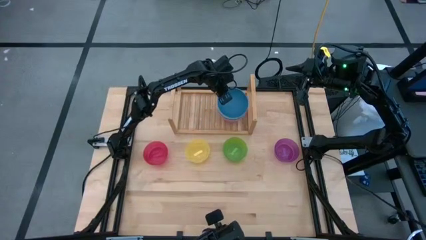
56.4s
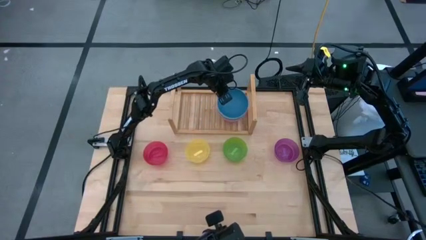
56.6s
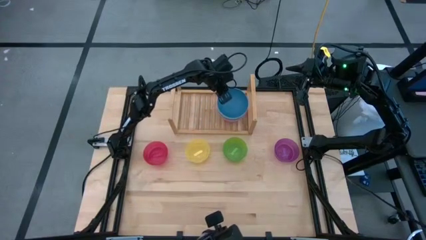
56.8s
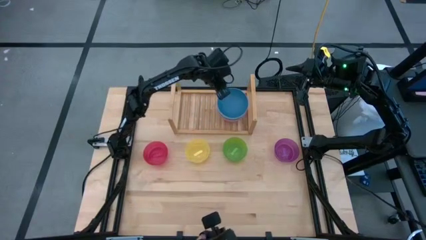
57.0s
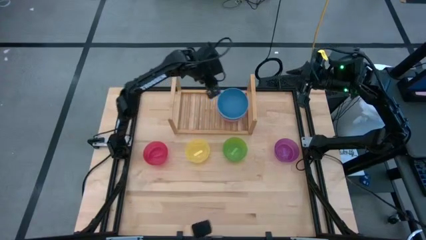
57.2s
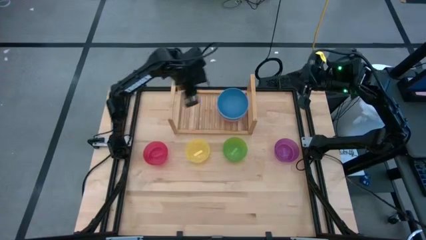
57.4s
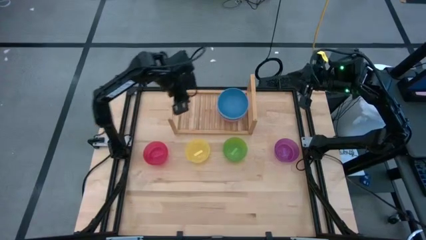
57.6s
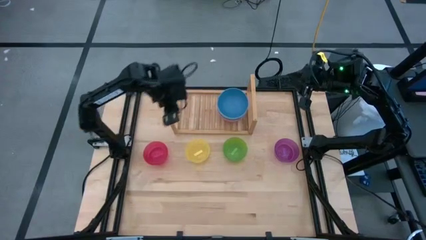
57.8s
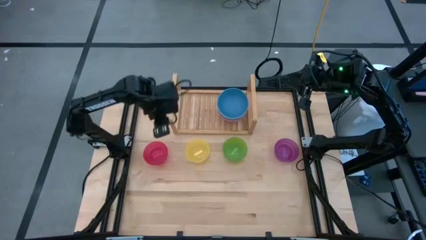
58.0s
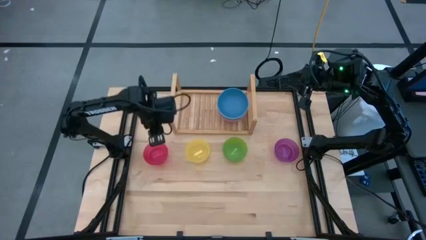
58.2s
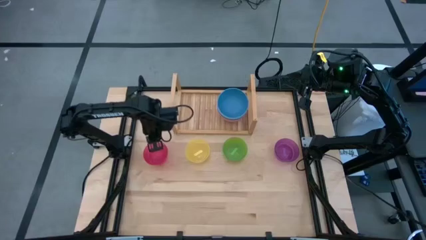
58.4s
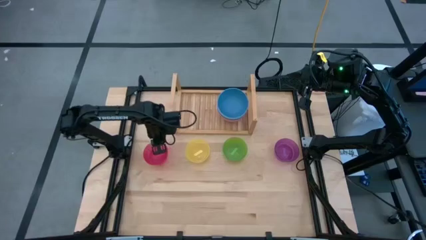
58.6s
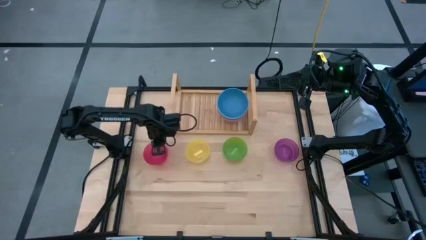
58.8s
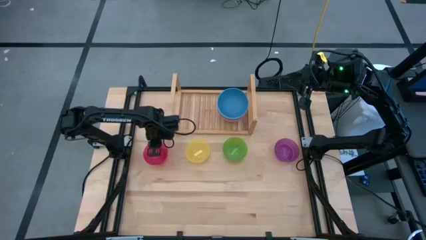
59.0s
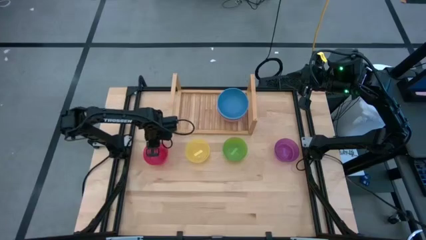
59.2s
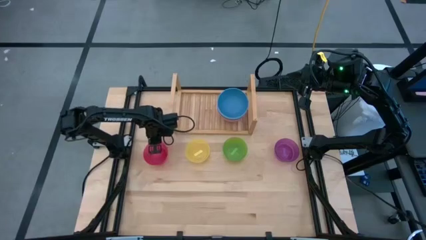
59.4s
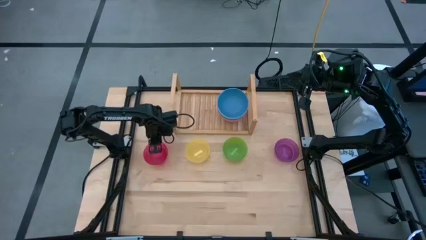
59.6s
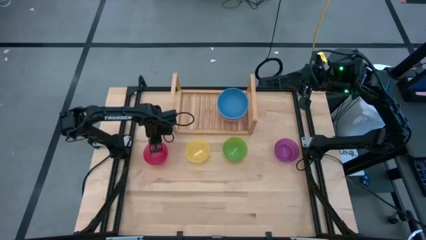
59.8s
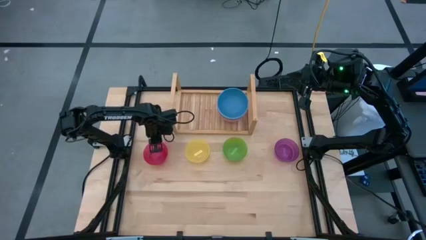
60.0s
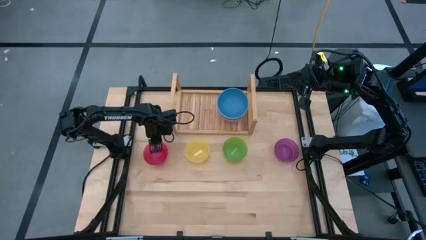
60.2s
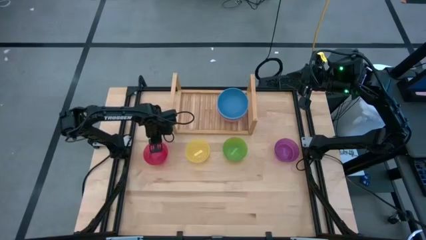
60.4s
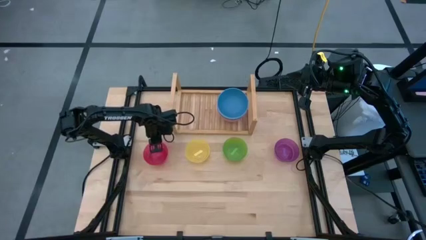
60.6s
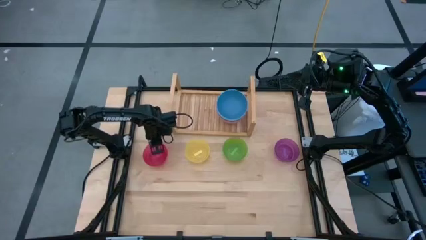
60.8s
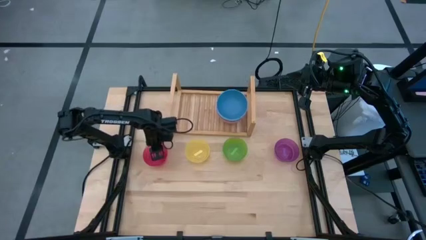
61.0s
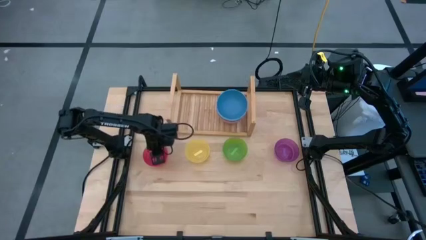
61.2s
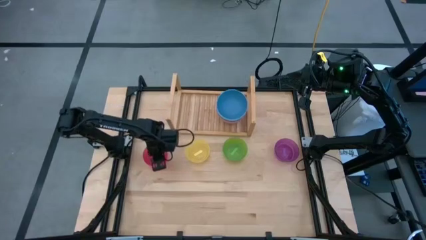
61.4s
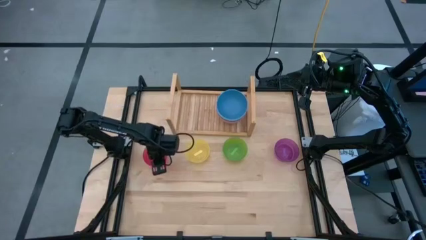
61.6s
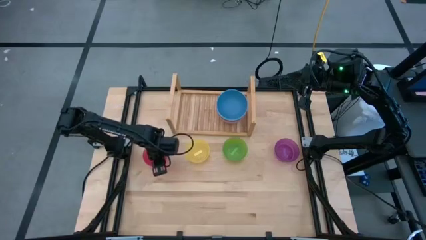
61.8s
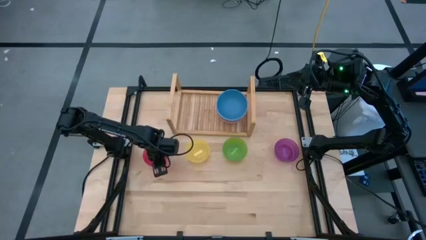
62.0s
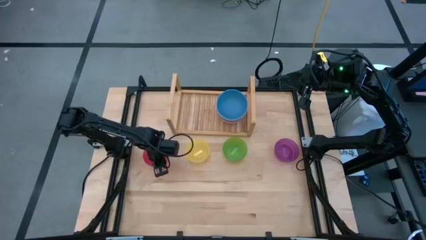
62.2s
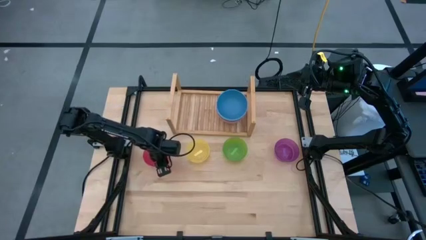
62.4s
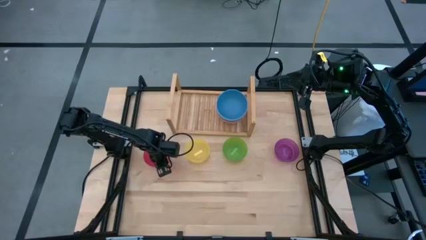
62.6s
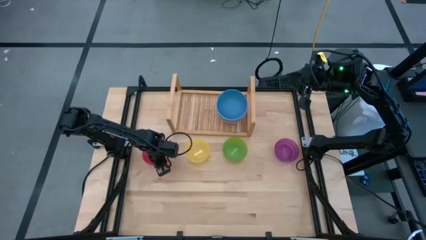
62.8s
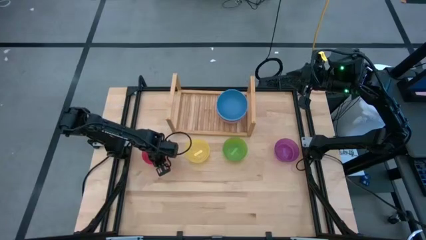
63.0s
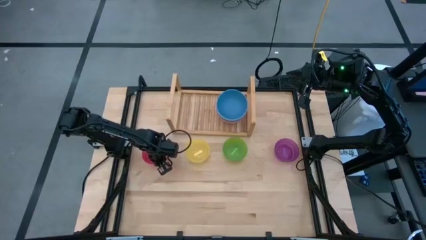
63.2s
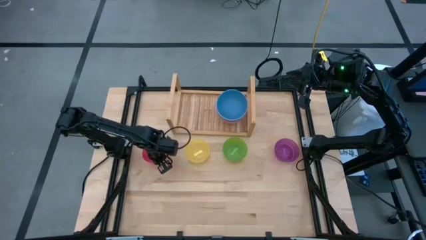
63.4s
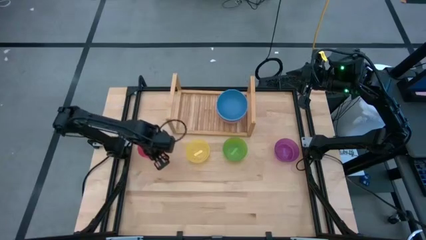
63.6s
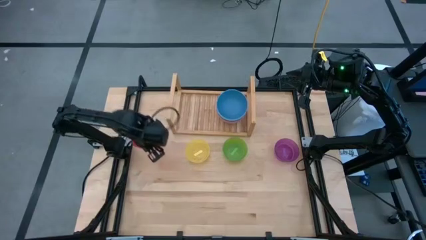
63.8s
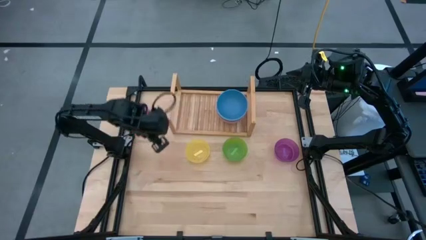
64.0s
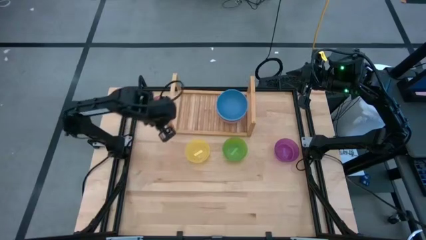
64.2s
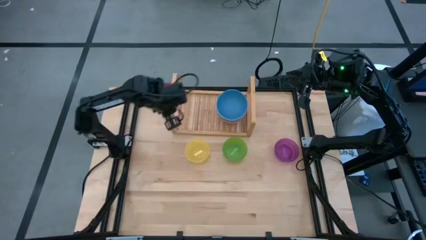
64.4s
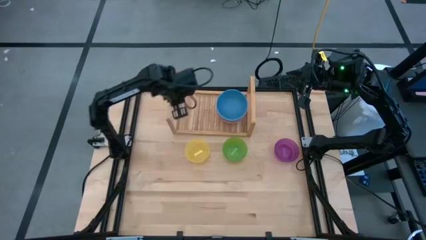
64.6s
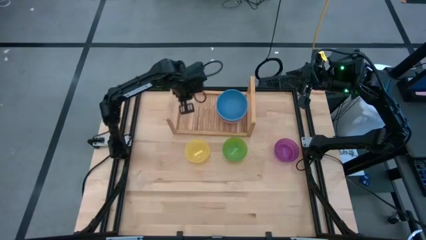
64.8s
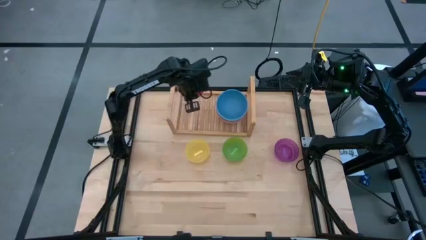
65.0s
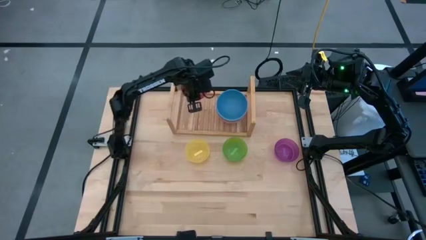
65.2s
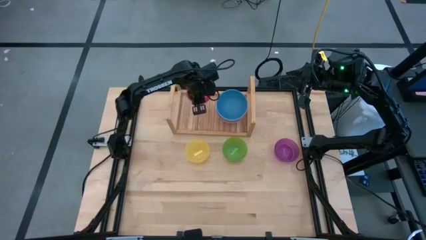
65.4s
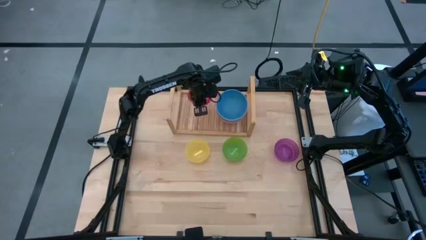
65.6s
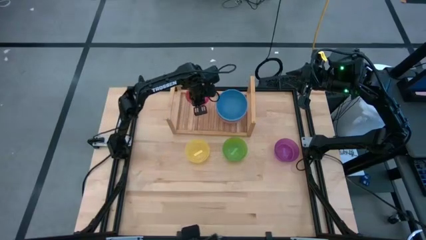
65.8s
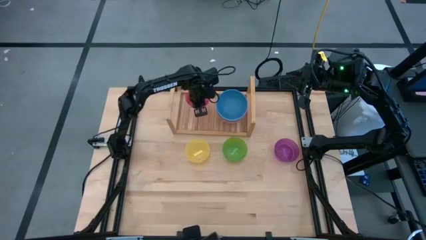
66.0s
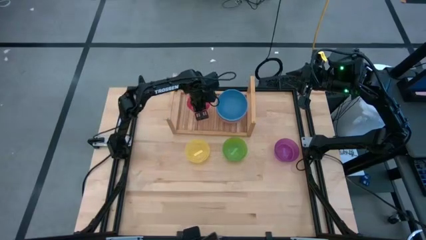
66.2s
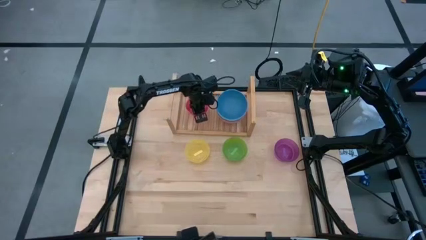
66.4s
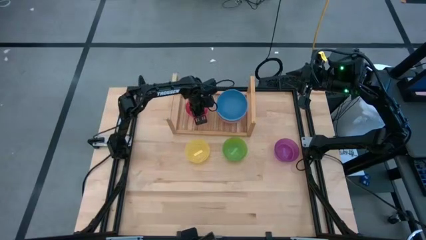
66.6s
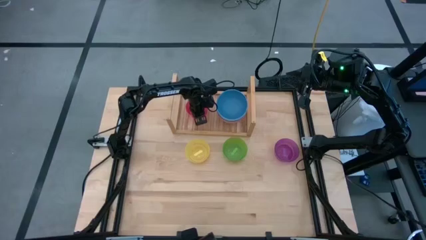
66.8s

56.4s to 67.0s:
Task: Place and stack bowls onto a shelf
Put the red bowl on the shelf

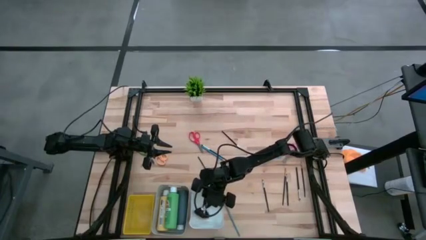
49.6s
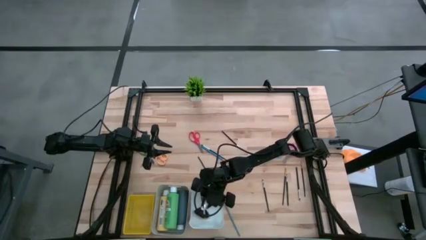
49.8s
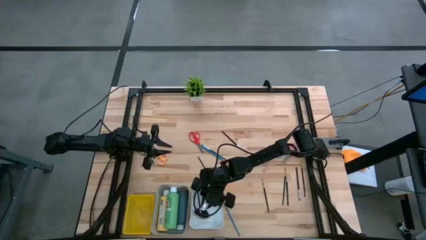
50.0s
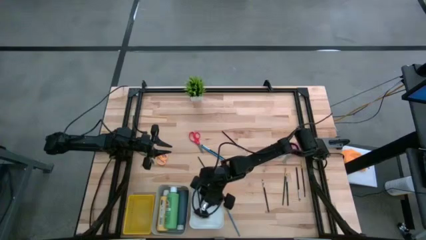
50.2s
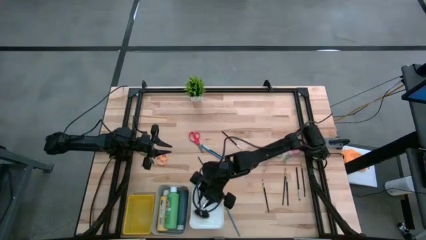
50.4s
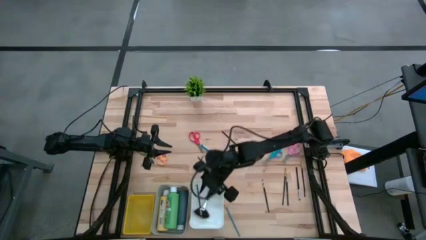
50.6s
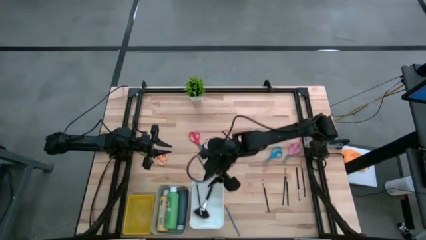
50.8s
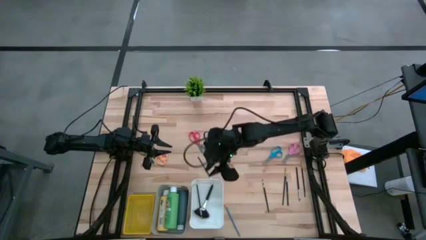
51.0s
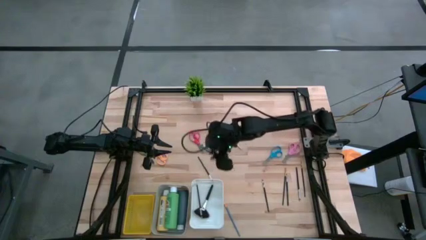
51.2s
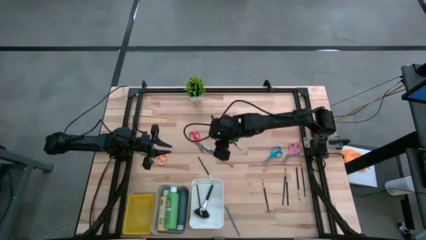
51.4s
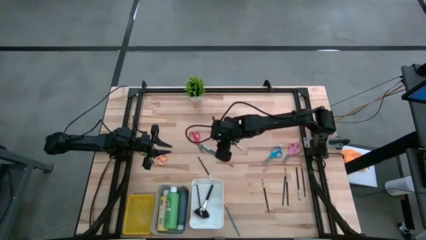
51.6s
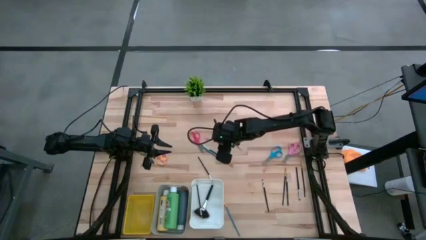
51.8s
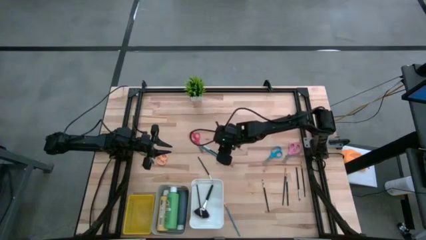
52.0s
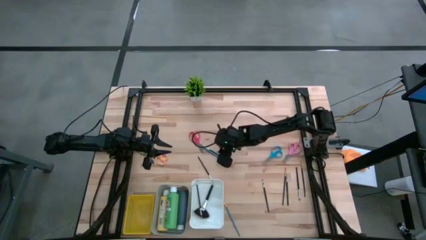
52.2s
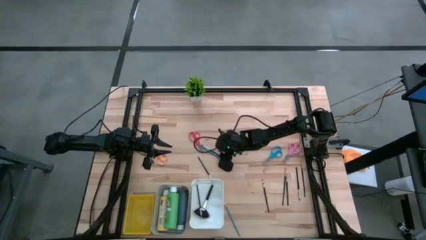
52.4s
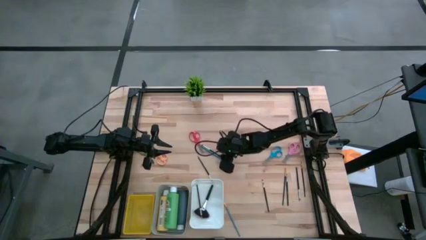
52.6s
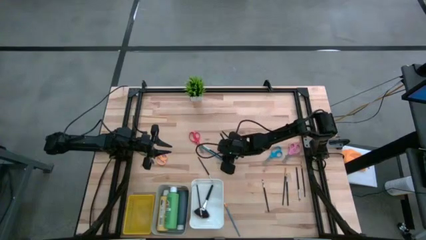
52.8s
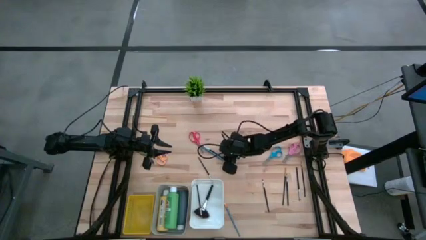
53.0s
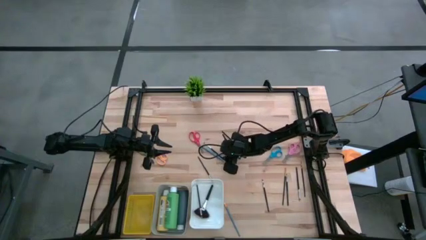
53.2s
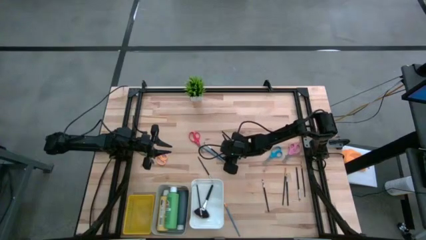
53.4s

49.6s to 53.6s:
Task: Pick & Place Paint Supplies
Put the black paint brush into the white bin
